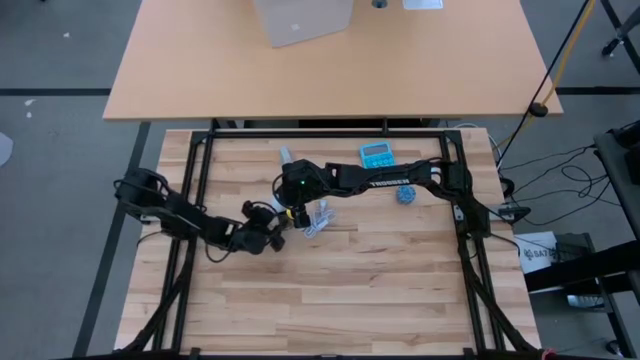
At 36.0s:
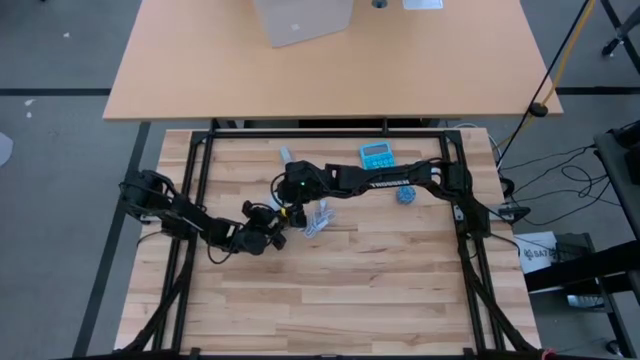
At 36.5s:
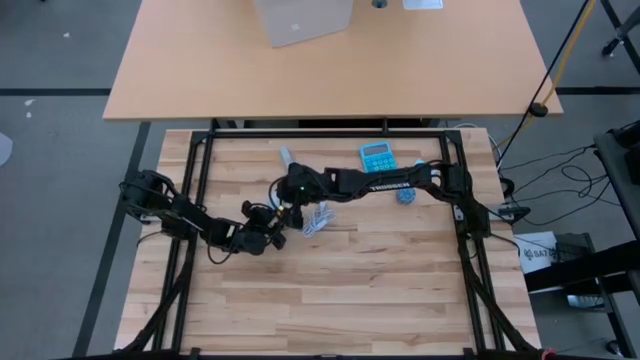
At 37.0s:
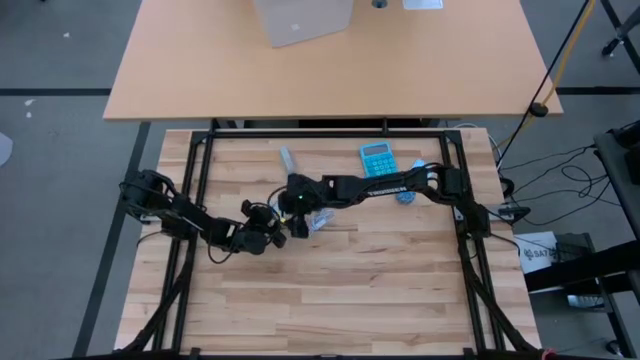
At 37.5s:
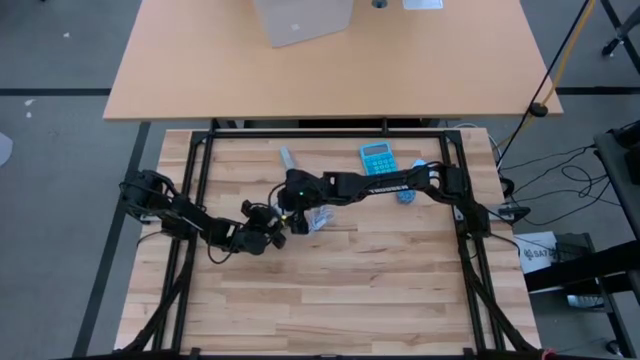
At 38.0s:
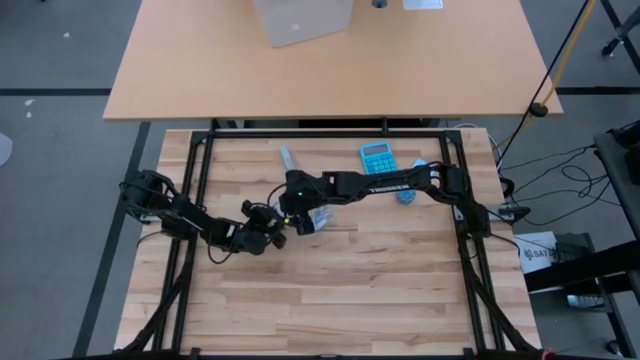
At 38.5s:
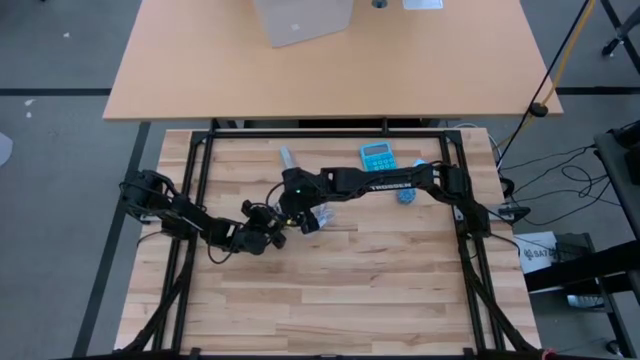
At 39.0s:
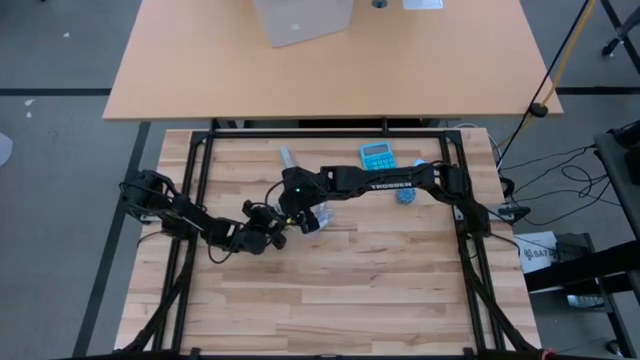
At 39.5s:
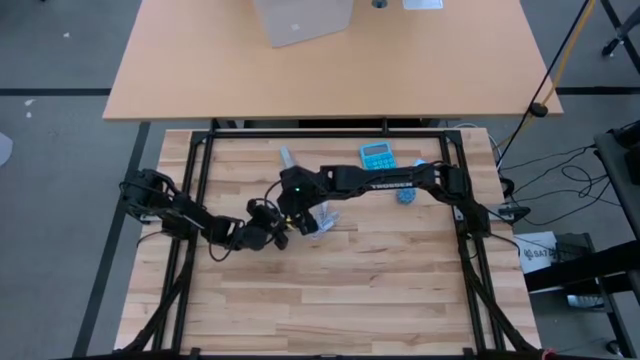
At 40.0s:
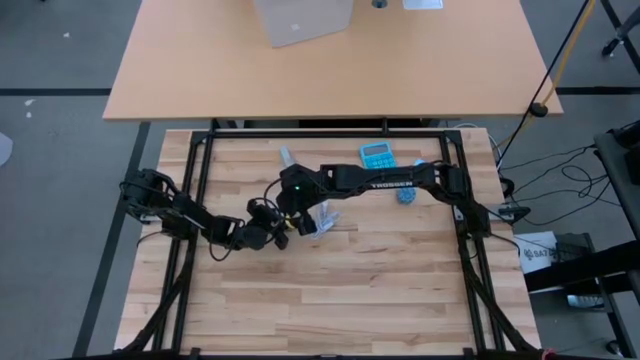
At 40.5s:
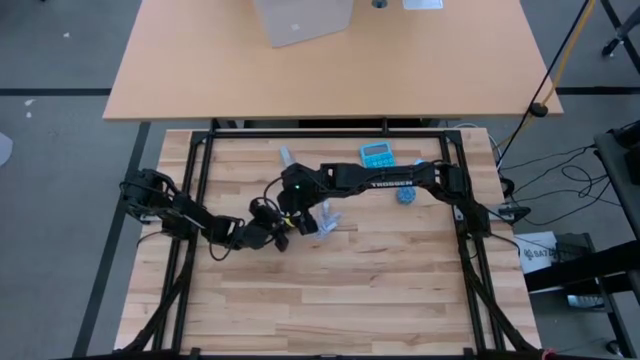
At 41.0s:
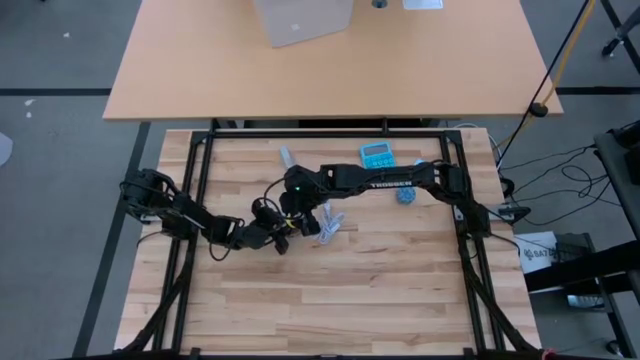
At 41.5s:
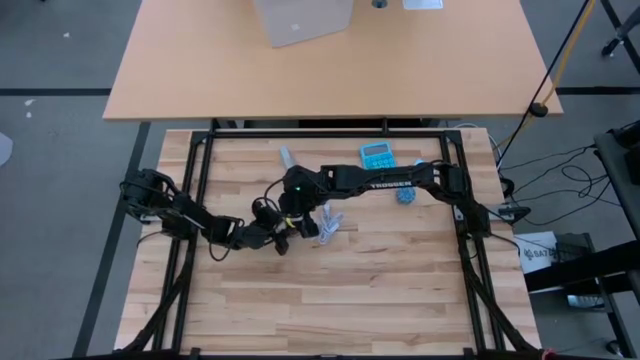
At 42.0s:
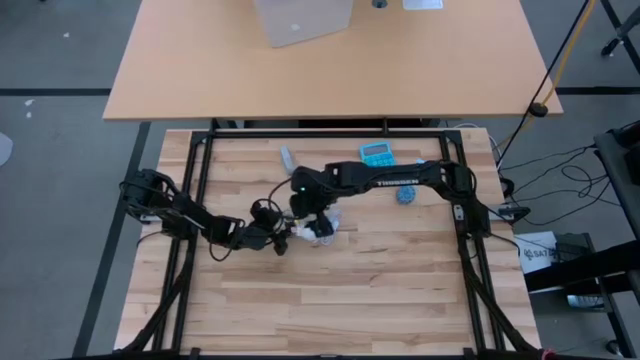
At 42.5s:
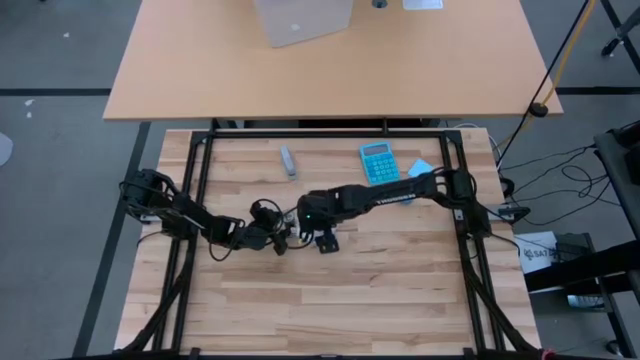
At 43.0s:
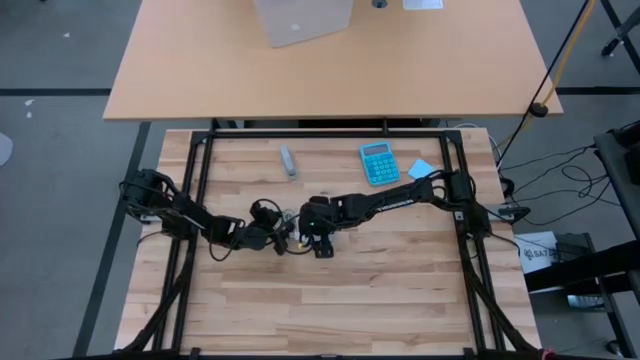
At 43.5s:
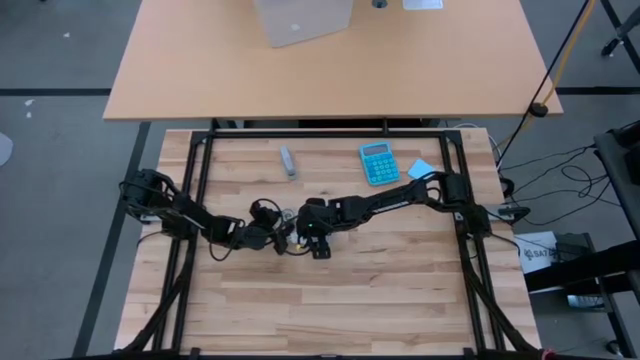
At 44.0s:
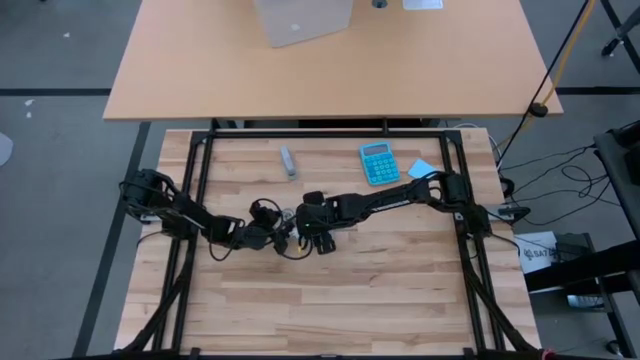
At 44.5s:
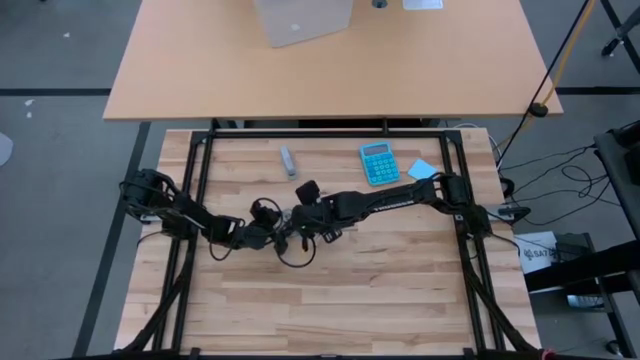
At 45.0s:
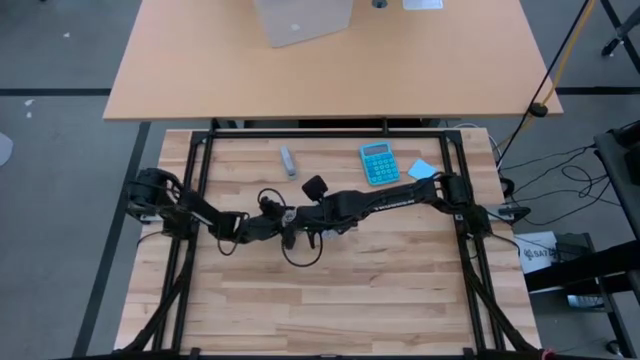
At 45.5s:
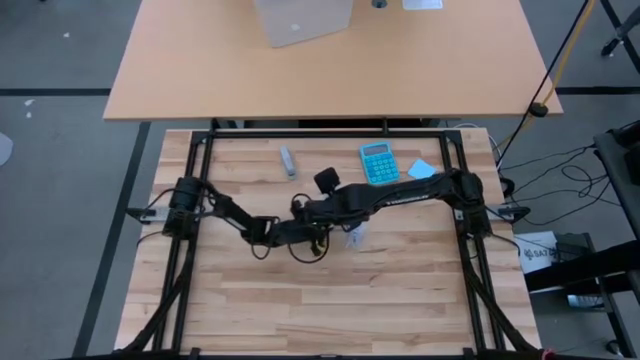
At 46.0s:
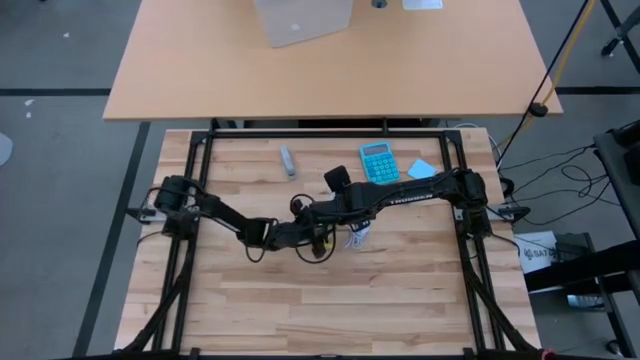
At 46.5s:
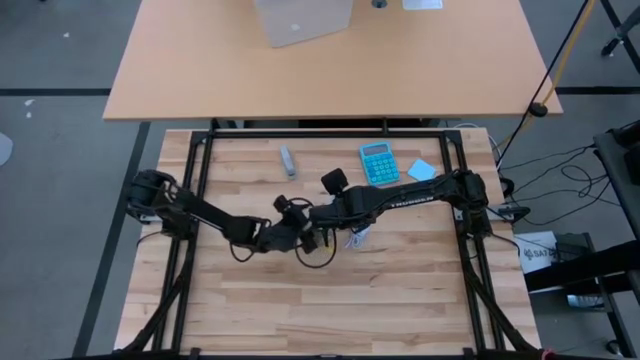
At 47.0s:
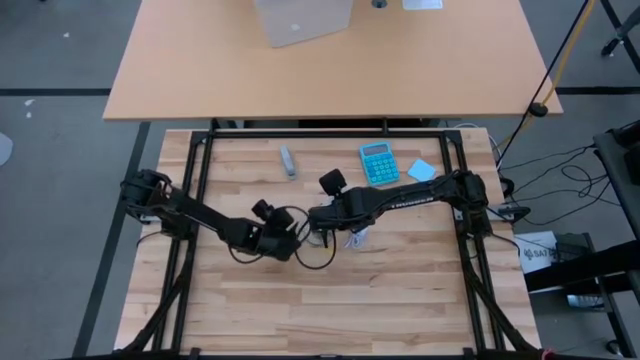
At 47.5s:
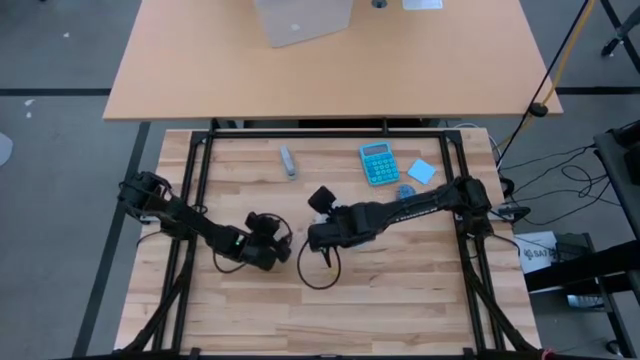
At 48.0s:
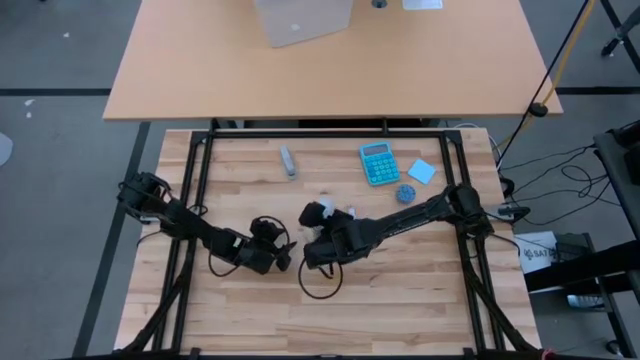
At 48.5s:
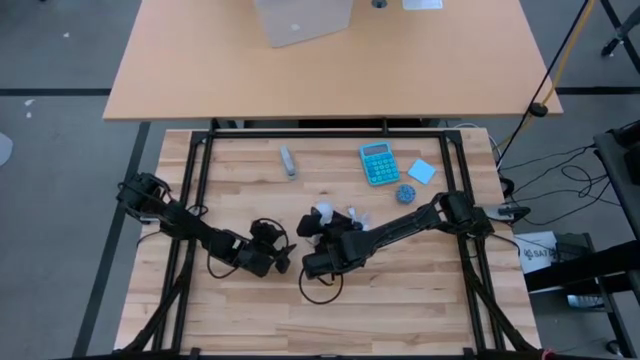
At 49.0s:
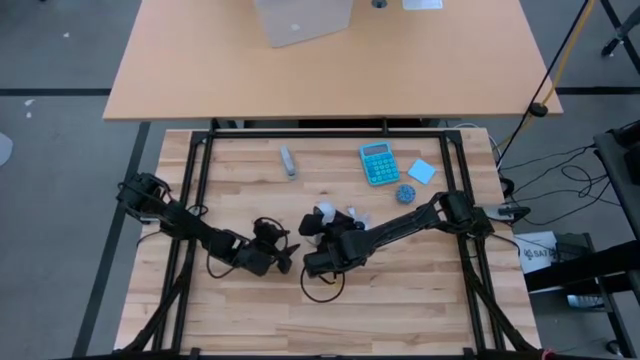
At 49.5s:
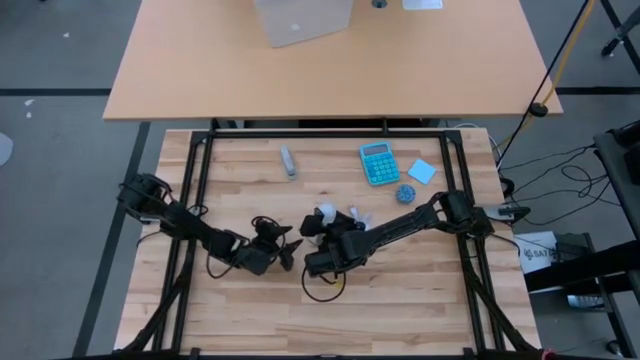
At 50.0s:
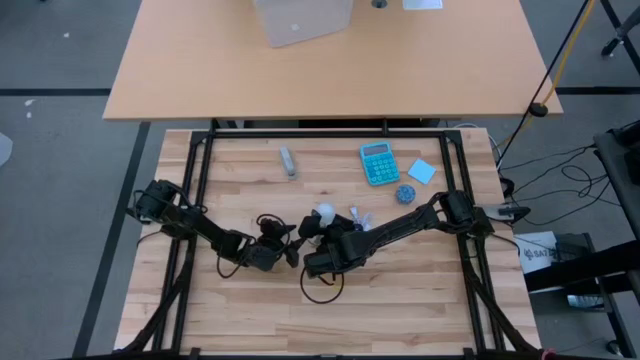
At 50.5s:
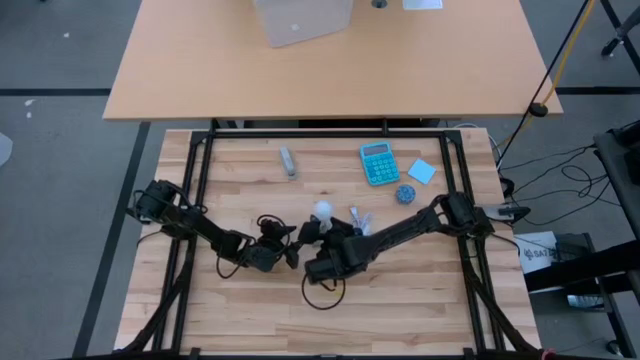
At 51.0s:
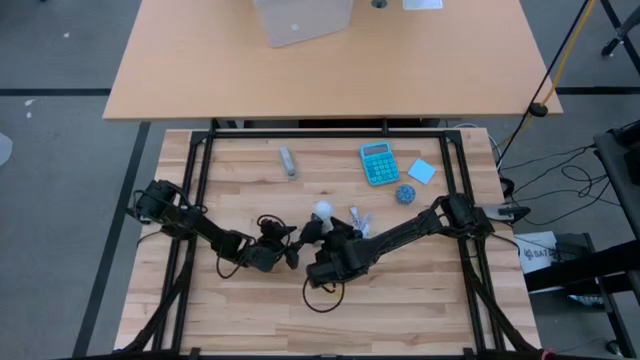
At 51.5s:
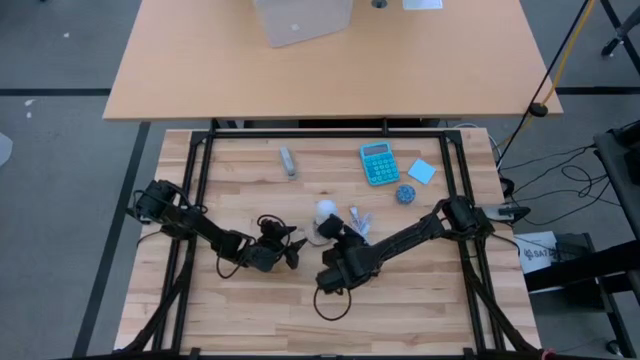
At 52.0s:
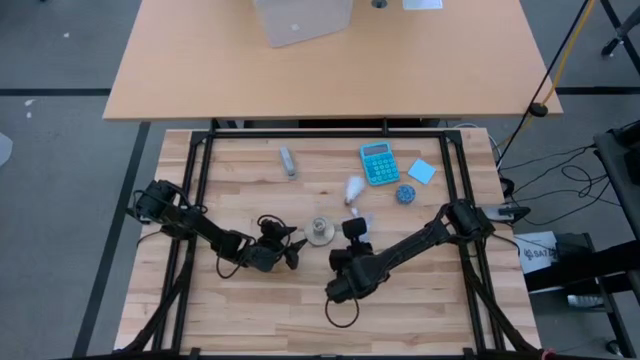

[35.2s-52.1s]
Task: Screw lightbulb
Insert the white lightbulb into the desk lamp

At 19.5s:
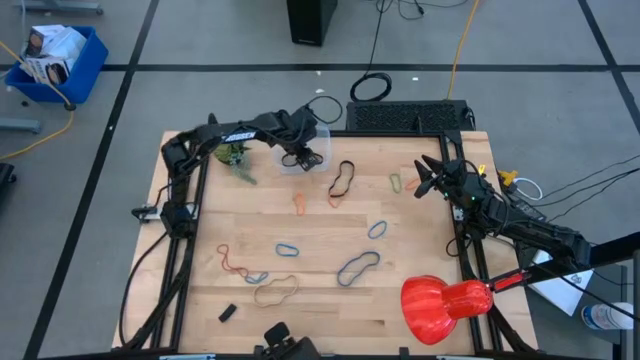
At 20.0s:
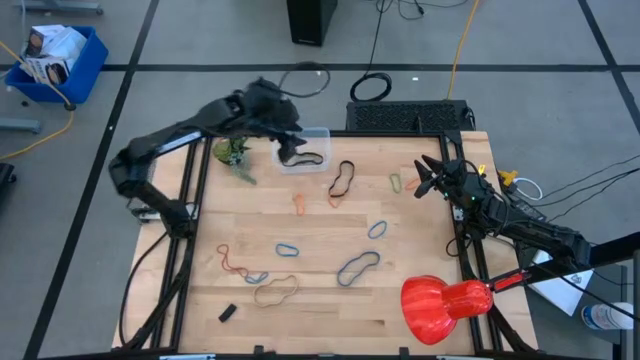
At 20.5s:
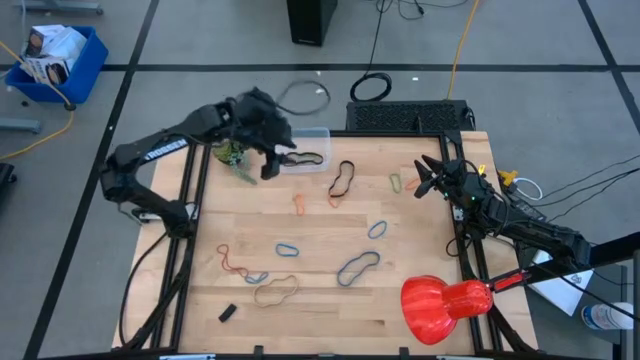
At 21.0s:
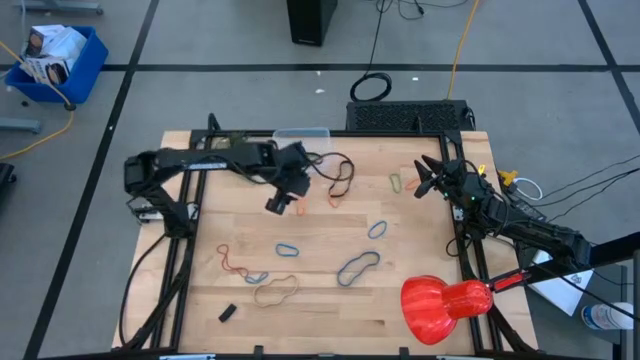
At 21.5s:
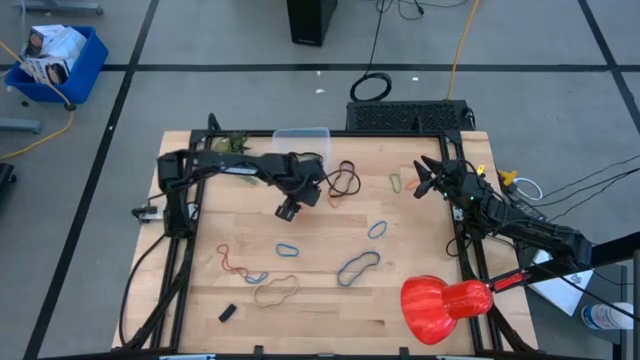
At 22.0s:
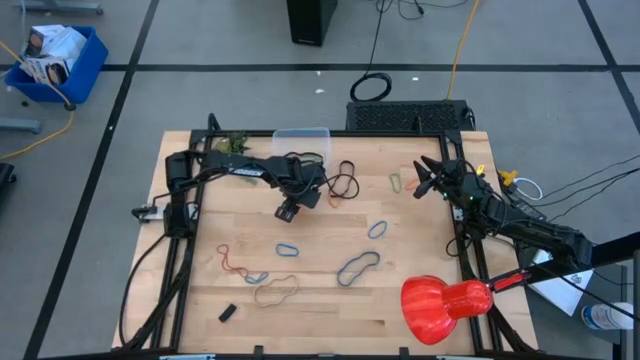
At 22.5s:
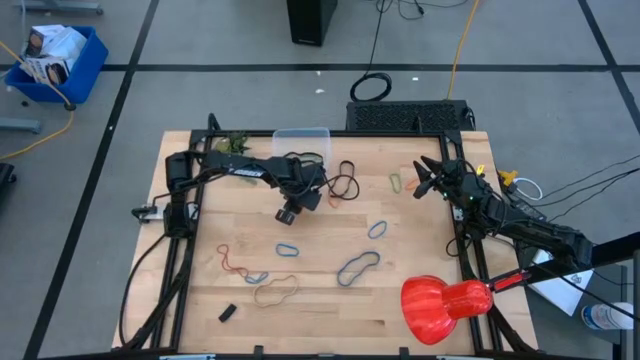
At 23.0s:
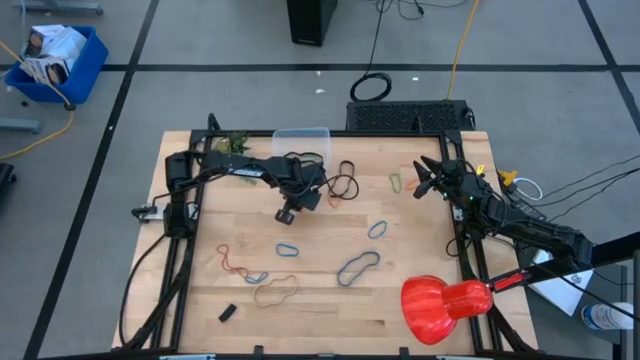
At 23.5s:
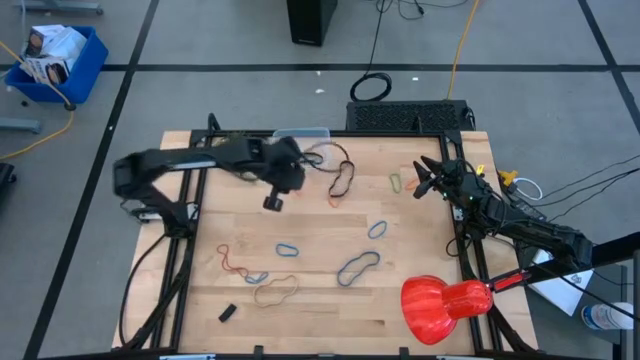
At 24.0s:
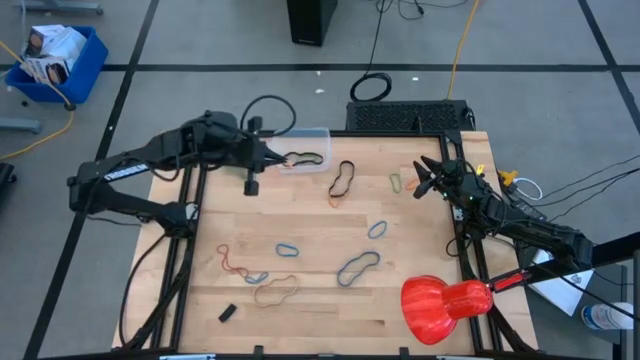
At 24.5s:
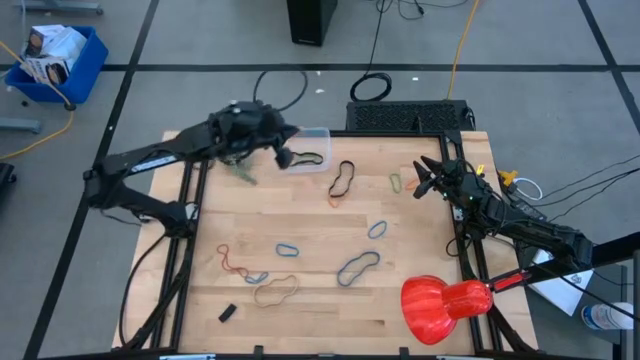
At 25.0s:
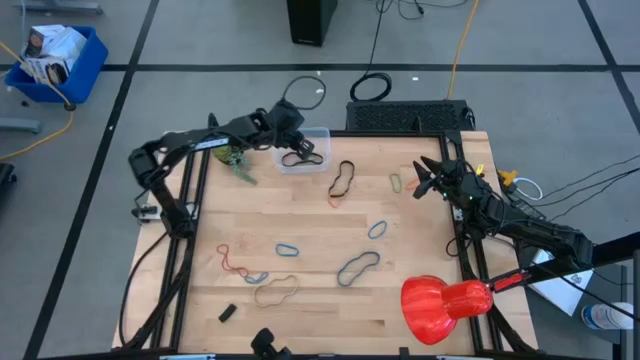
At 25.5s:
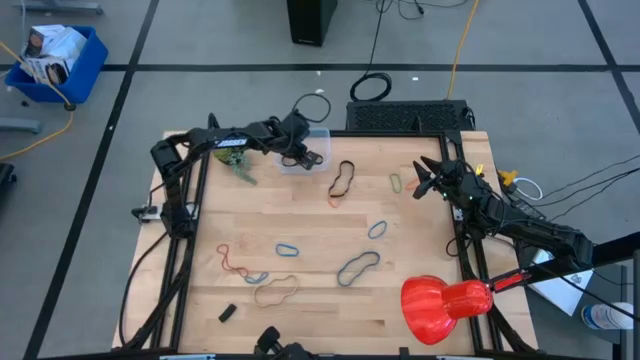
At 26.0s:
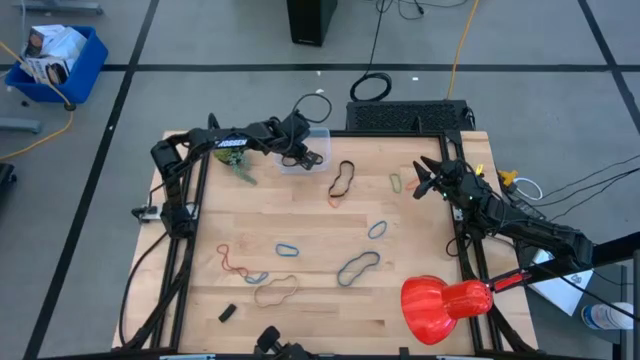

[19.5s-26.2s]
Task: Pick and place rubber bands into bin
Put the left orange rubber band into the transparent bin
